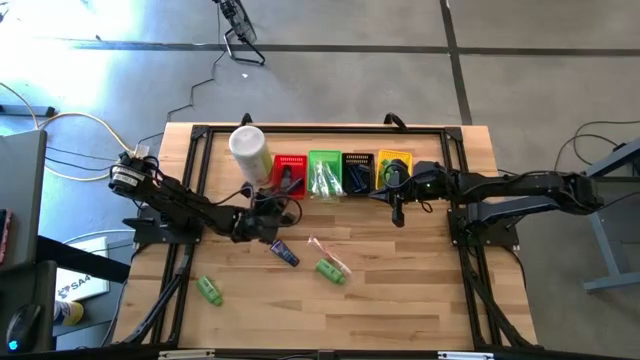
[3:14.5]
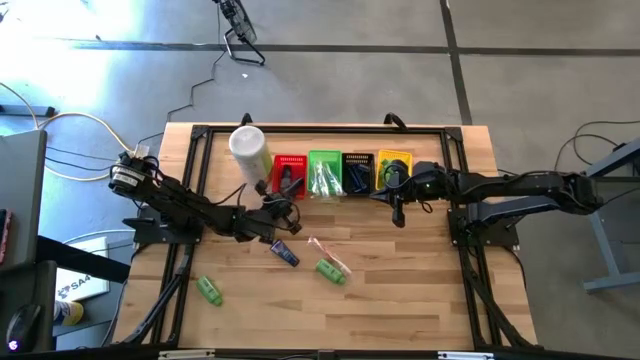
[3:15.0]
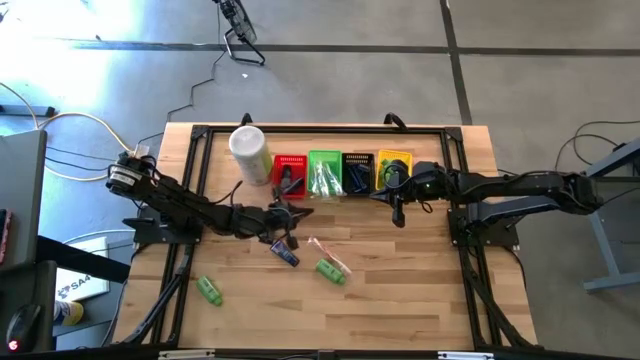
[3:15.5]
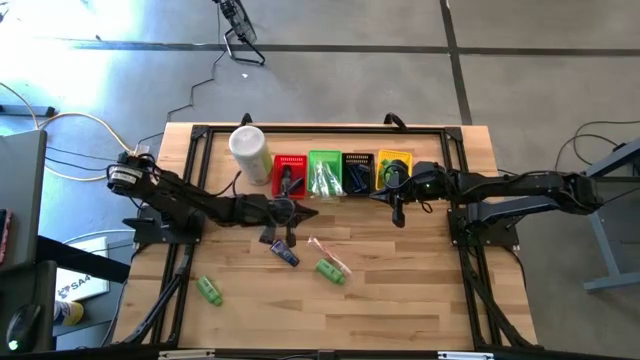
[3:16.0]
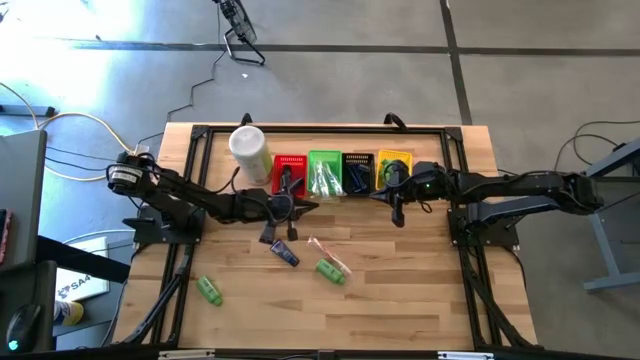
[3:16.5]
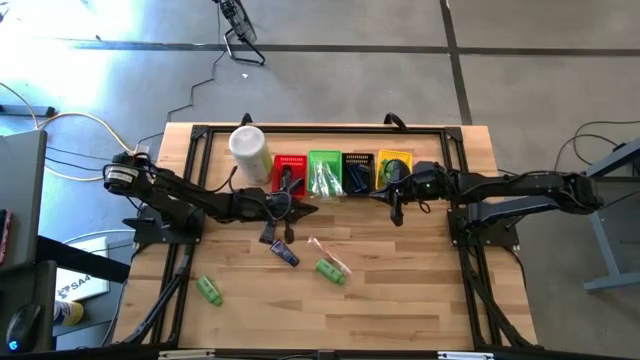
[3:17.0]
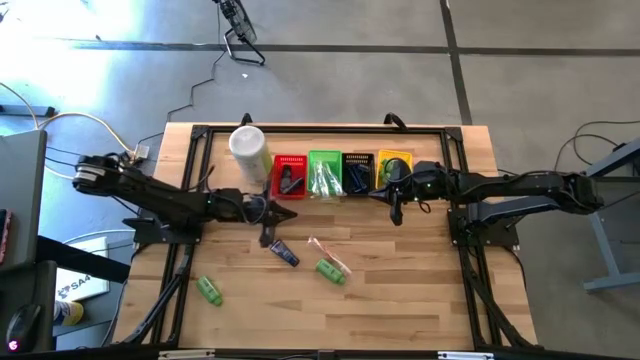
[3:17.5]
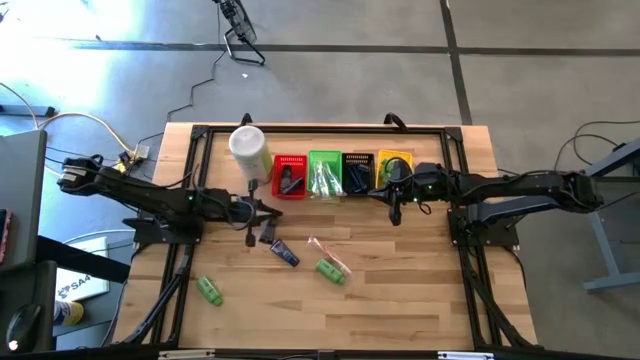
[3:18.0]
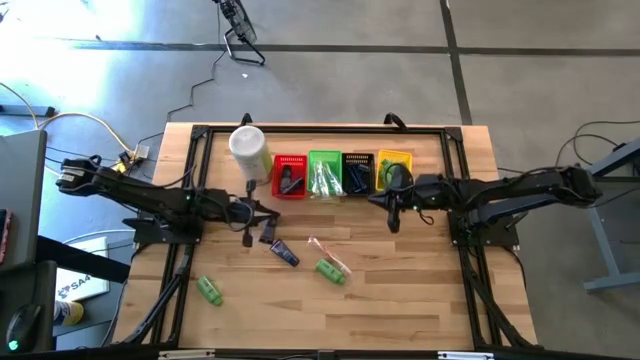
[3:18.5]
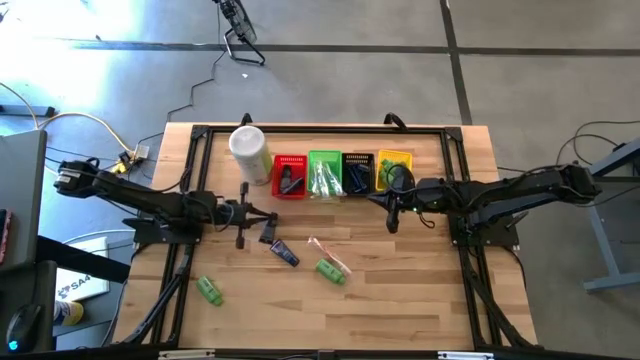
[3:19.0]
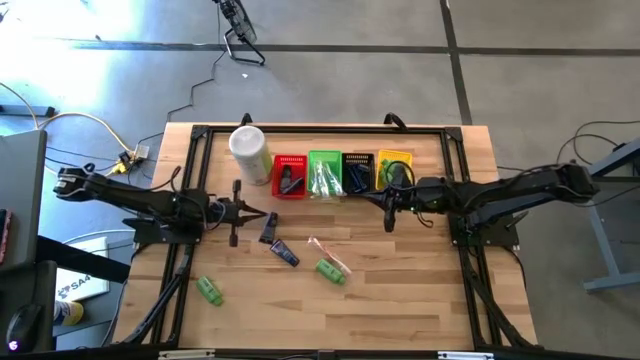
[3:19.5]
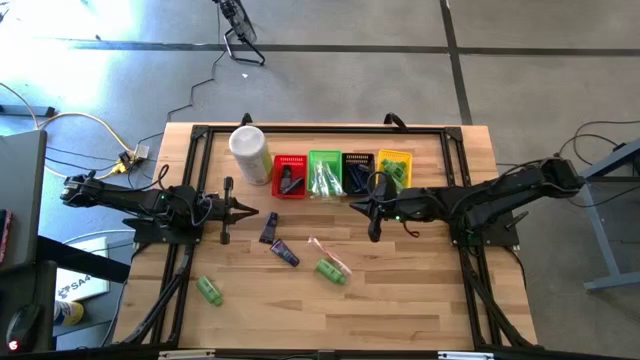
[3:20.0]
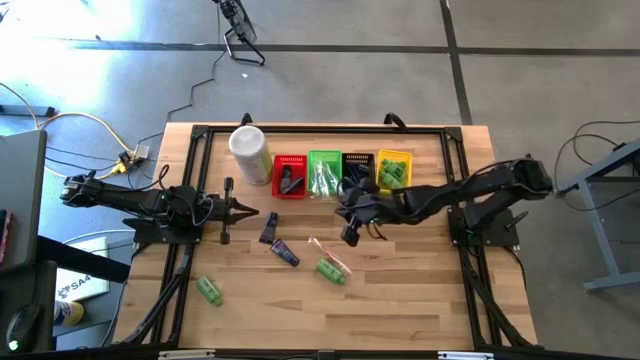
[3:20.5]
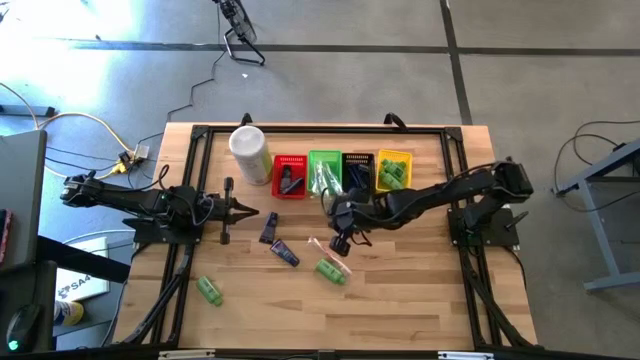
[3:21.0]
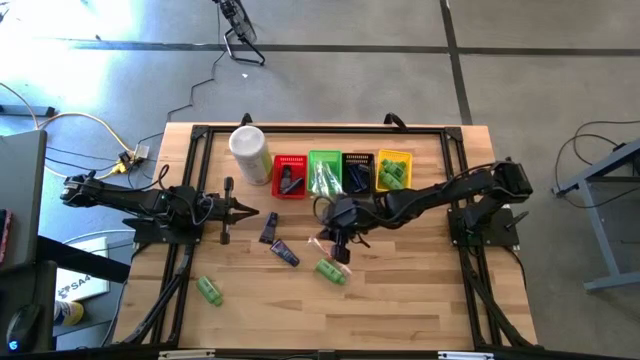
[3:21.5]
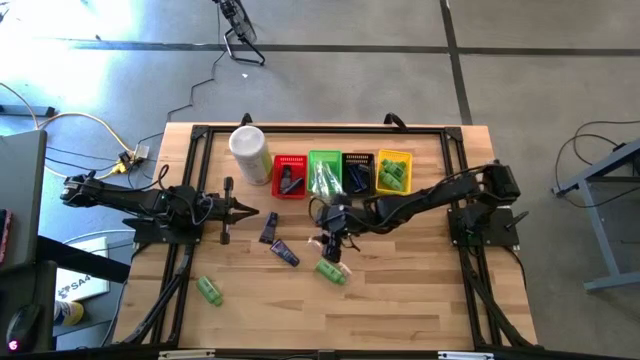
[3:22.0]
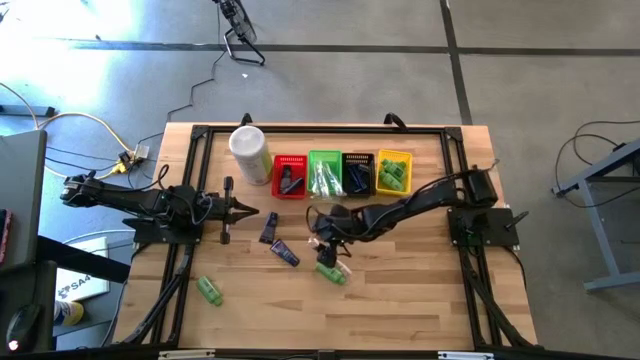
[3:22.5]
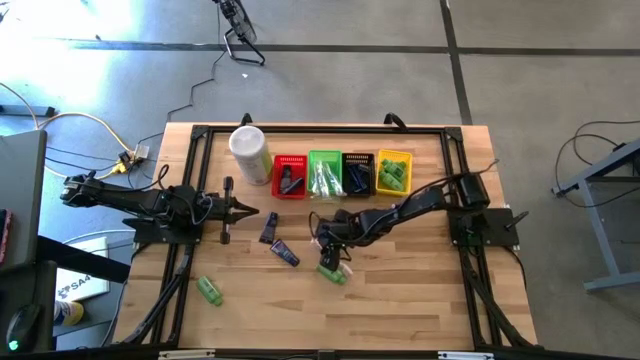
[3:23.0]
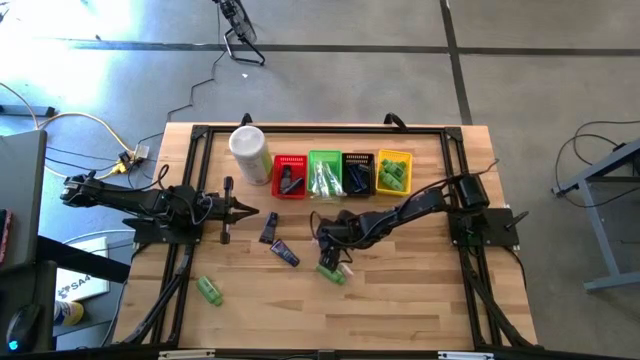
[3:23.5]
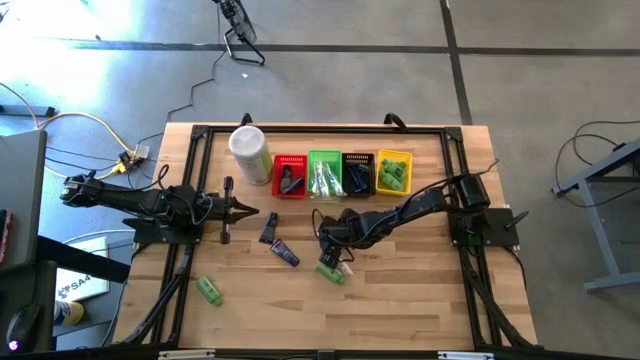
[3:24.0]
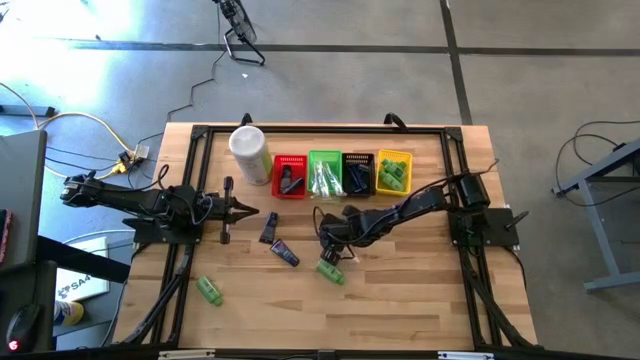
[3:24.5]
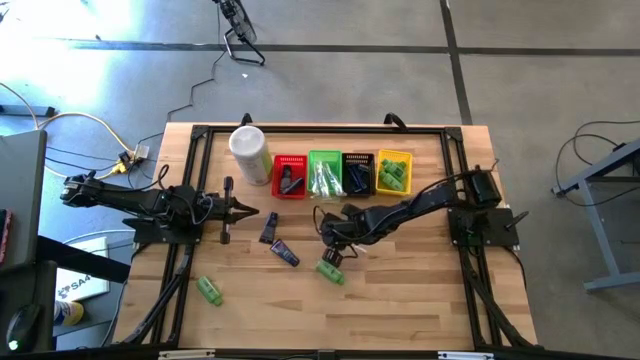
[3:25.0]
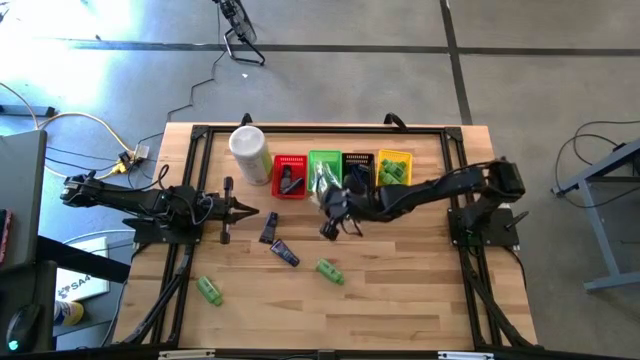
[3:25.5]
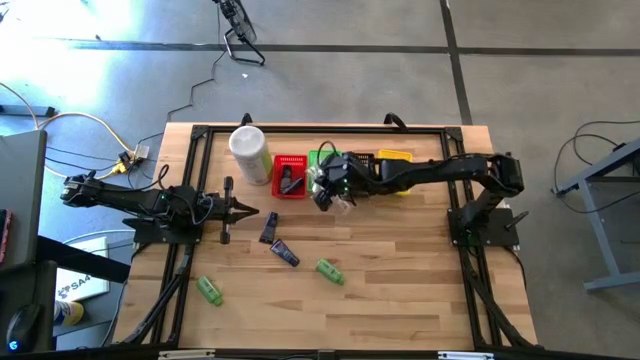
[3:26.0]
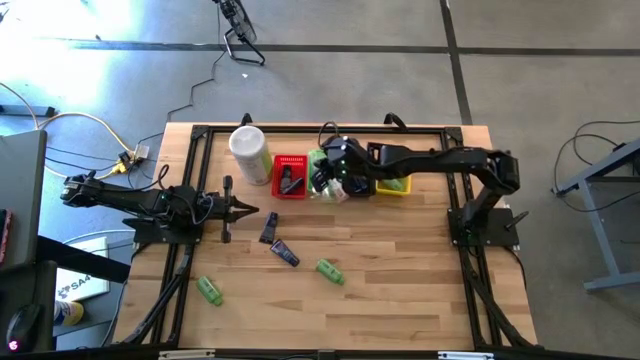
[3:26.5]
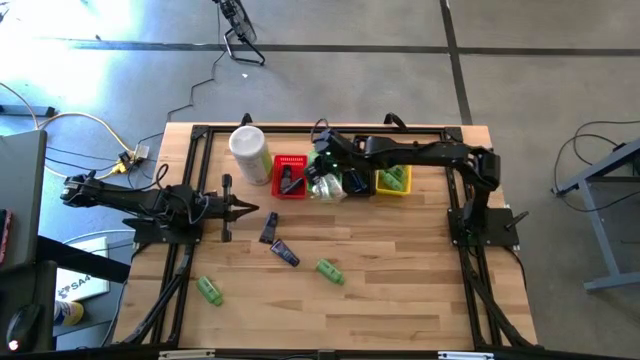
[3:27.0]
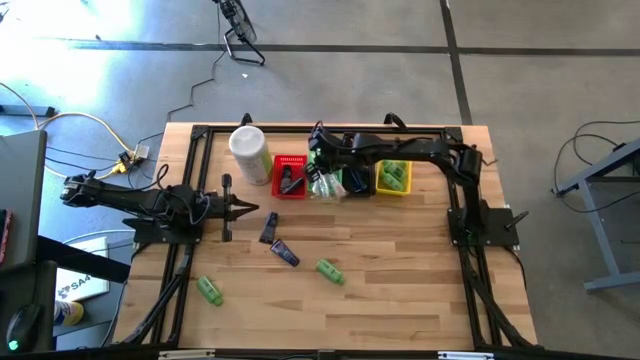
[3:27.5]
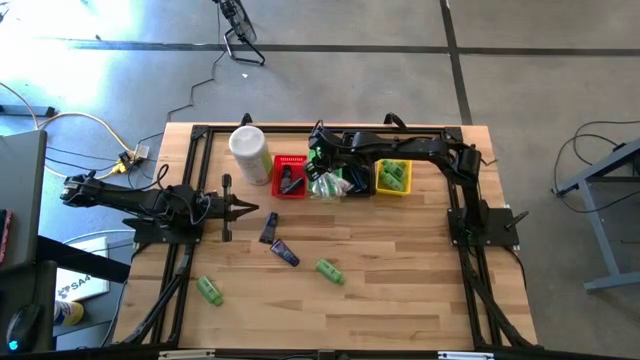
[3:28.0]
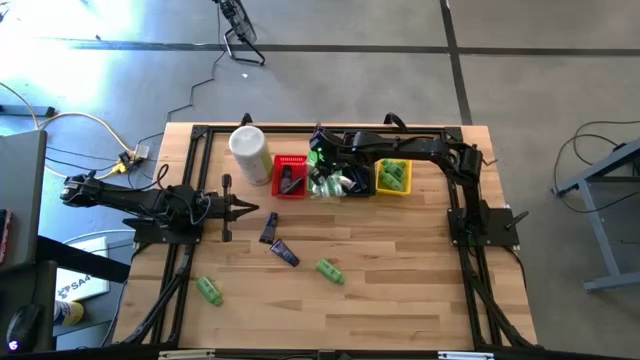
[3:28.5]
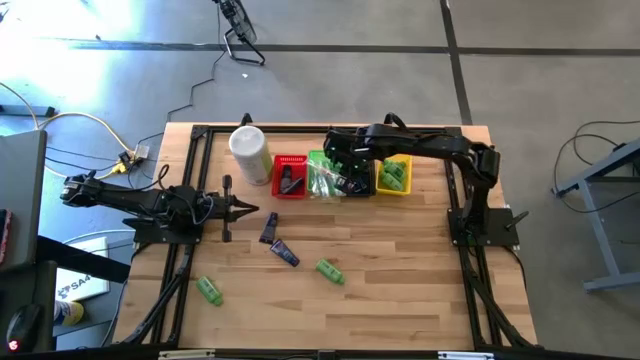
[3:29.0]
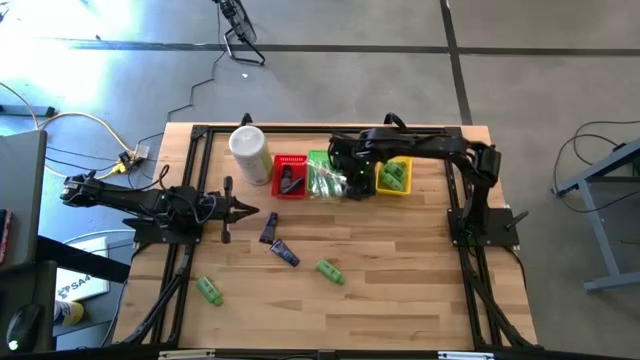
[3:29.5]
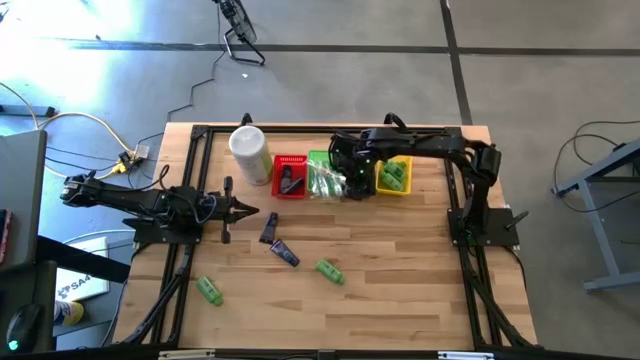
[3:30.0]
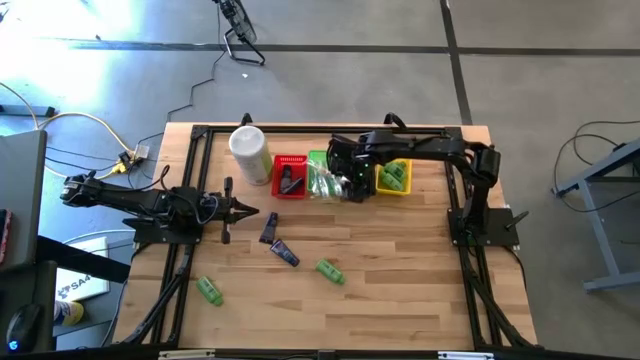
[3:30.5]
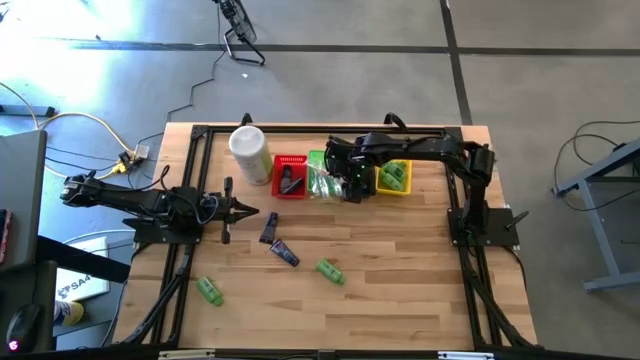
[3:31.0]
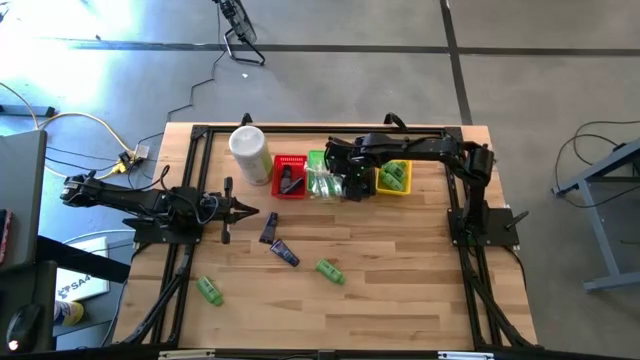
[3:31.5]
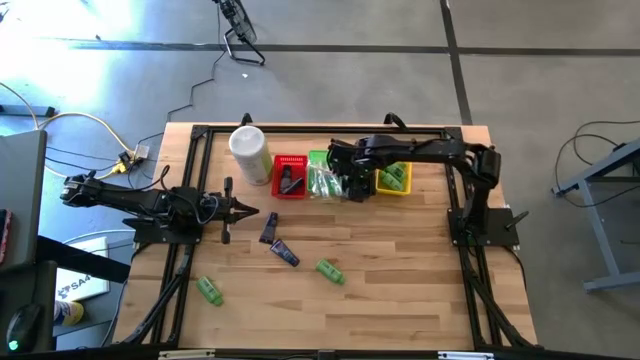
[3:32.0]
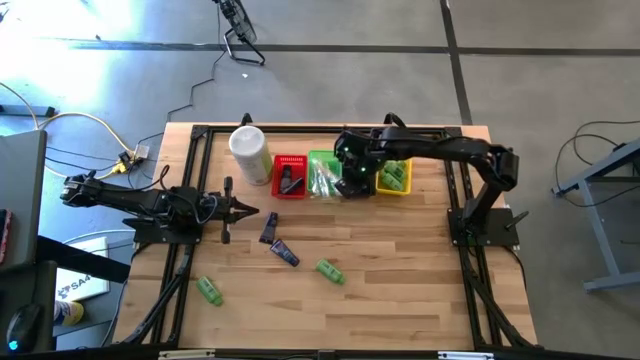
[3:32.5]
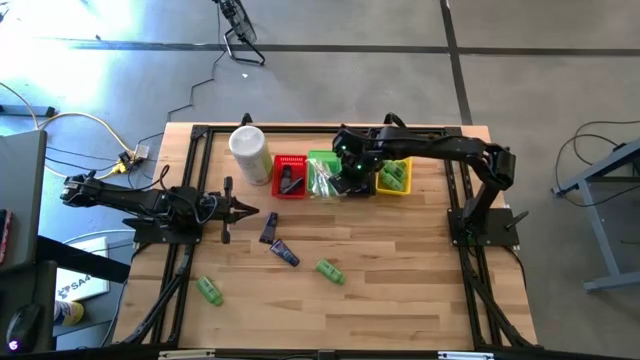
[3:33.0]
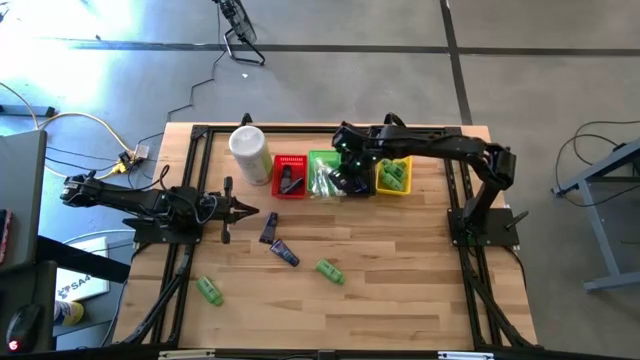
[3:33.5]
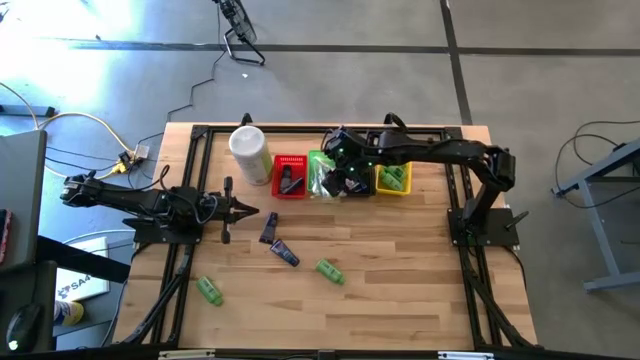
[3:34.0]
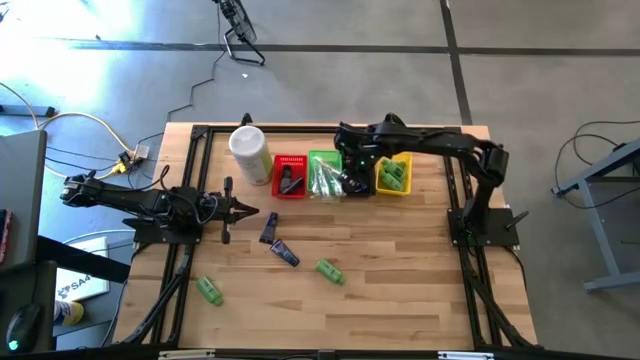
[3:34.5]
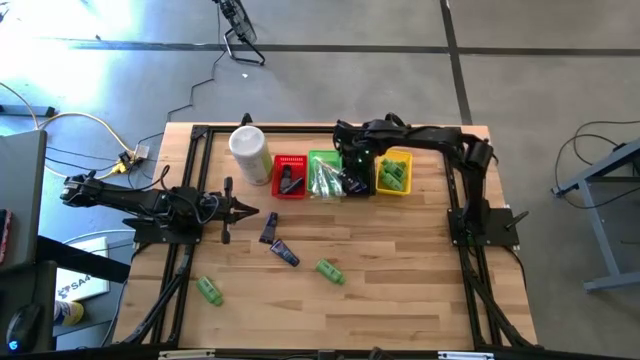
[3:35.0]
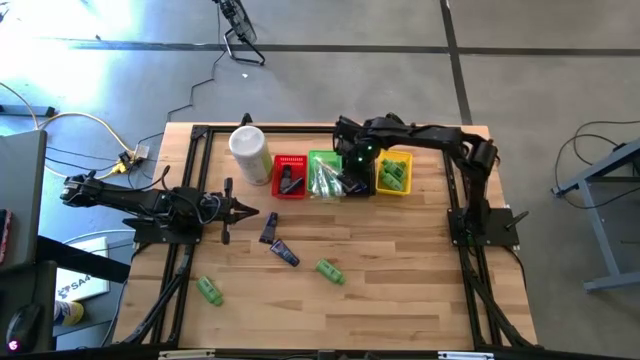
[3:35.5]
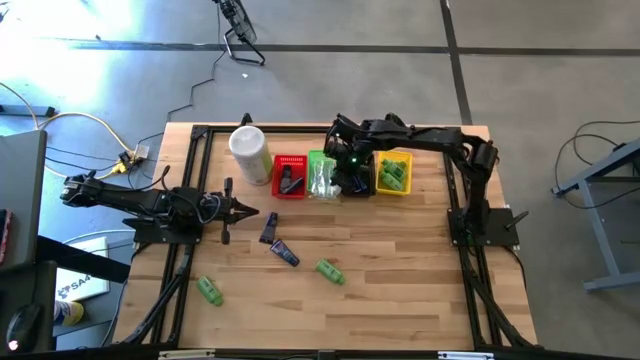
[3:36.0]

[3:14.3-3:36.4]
Task: Pick & Place Travel size toiletries
Put the red toothbrush into the green bin
